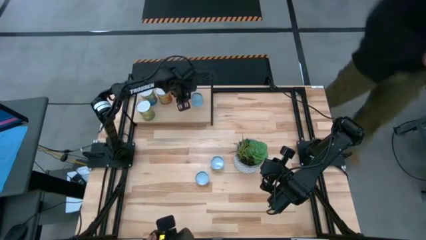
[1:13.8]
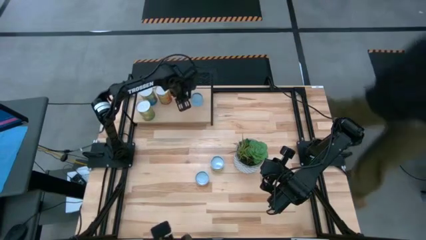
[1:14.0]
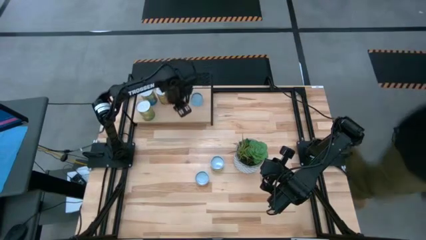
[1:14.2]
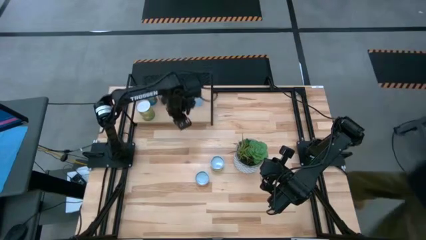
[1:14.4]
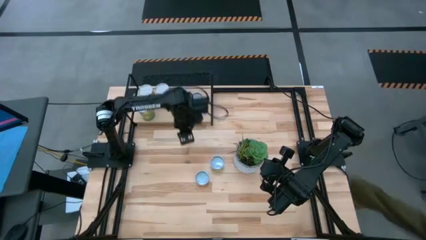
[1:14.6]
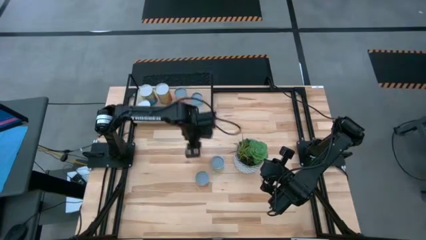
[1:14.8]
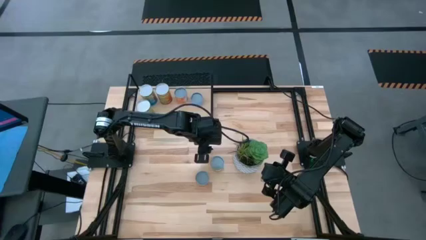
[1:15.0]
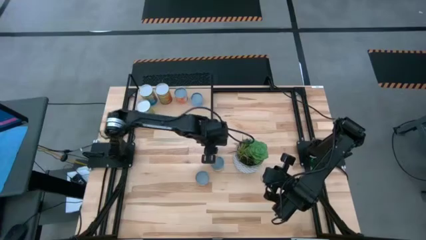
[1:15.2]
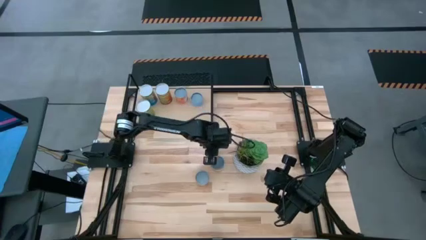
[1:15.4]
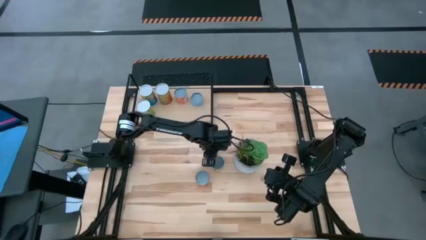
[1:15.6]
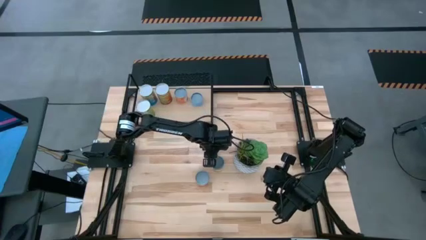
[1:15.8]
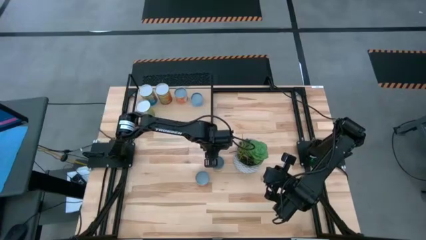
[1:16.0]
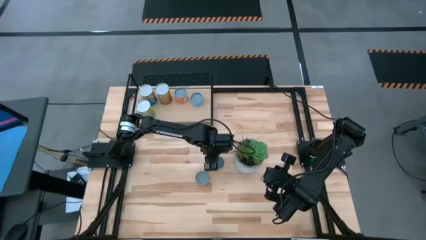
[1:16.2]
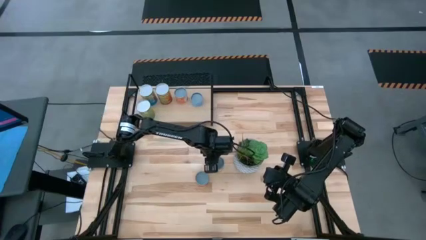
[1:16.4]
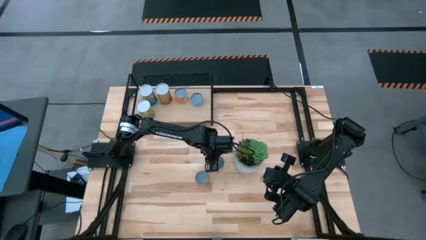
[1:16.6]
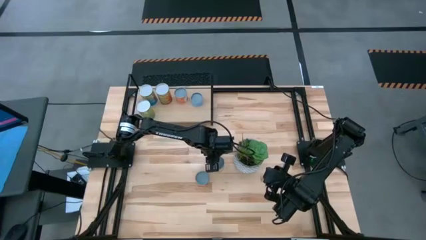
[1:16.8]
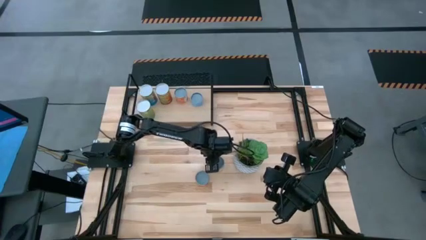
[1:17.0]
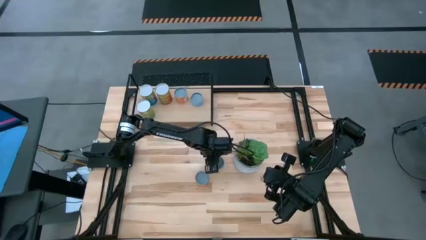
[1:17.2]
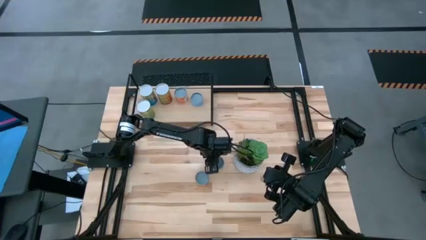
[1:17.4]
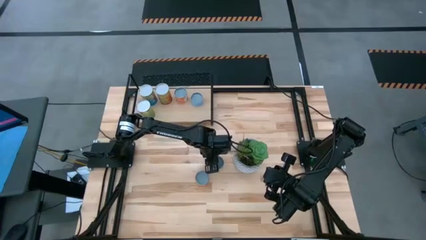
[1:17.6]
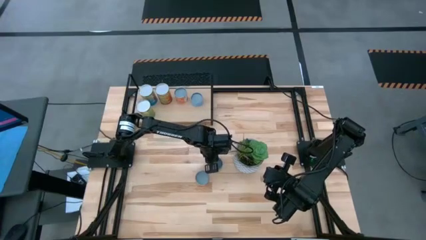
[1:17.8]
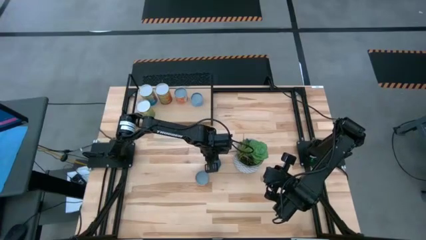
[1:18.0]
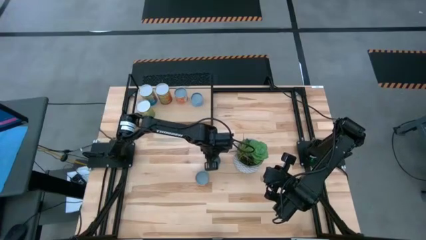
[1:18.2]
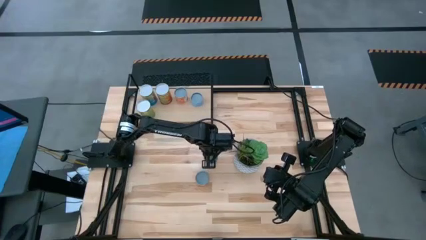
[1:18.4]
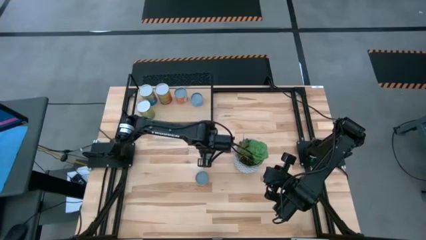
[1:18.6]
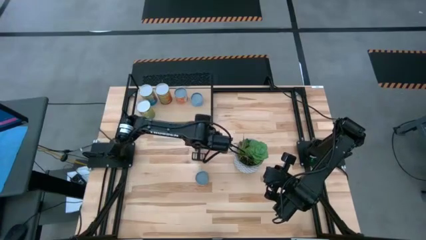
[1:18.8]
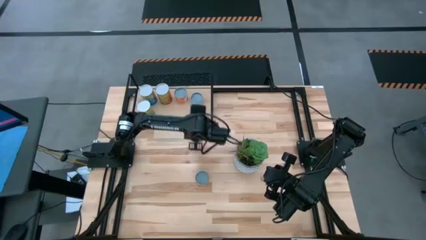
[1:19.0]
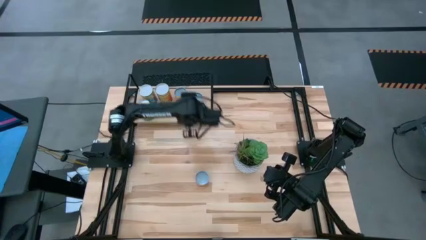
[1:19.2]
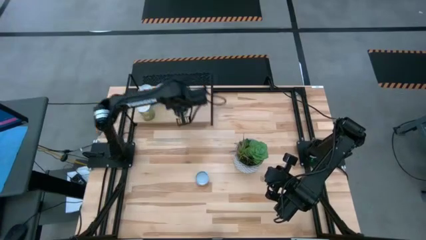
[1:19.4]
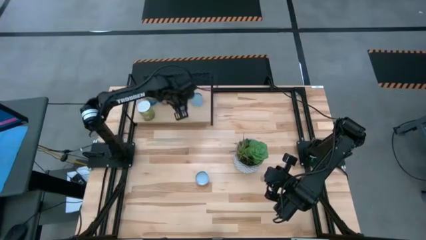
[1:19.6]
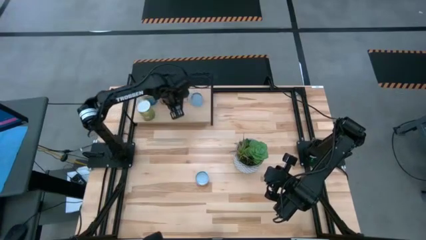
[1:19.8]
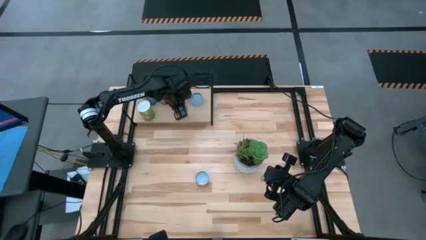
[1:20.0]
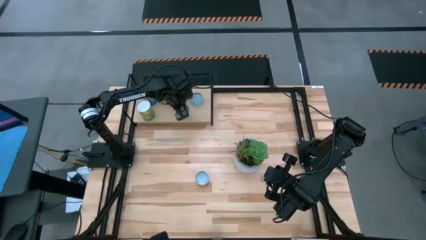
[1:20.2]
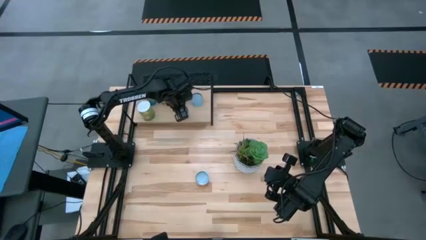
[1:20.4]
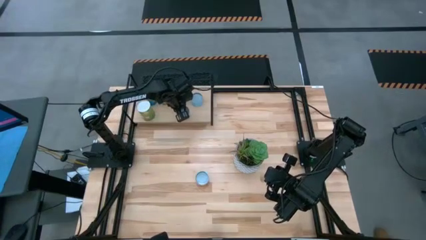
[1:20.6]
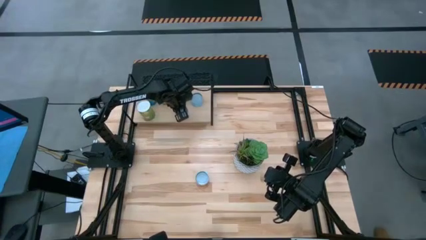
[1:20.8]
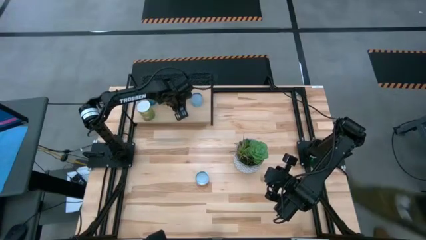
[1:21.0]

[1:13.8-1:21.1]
Task: Pick and place cans onto a shelf
Put the canned peaches on the shelf

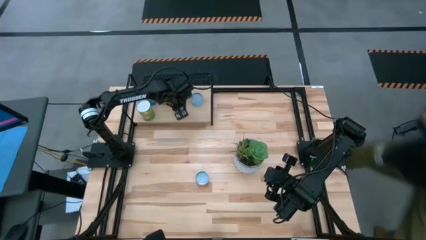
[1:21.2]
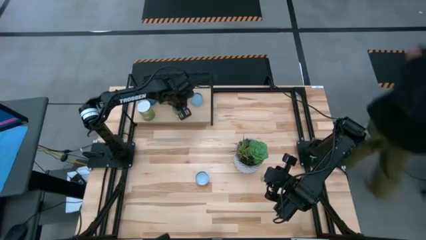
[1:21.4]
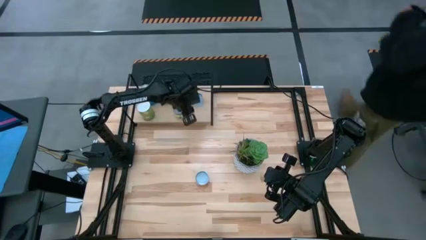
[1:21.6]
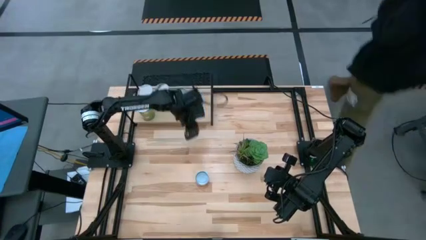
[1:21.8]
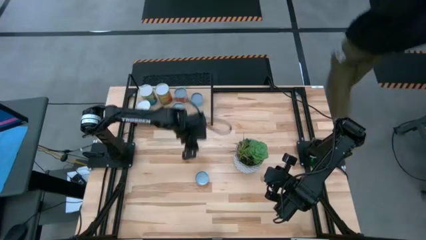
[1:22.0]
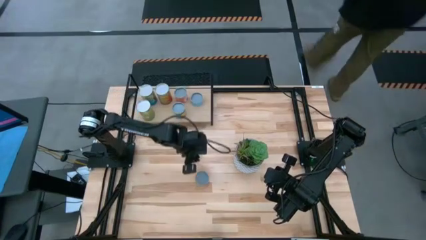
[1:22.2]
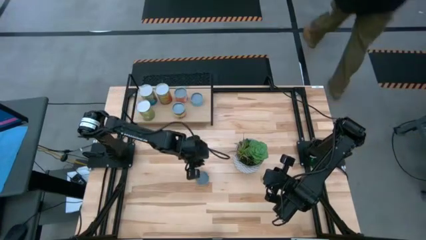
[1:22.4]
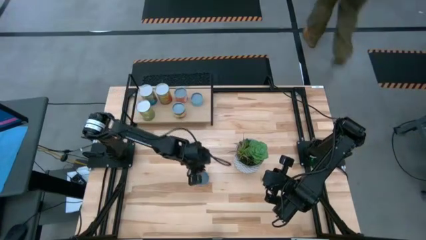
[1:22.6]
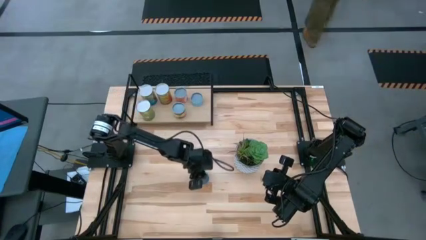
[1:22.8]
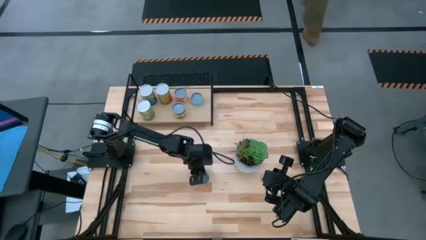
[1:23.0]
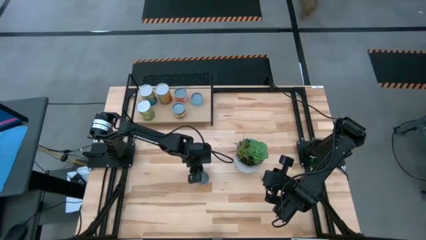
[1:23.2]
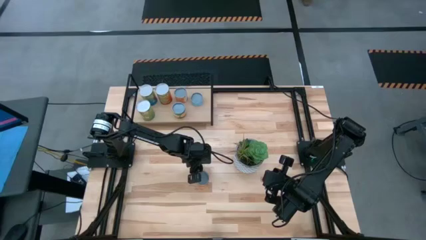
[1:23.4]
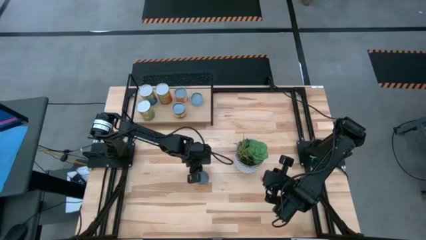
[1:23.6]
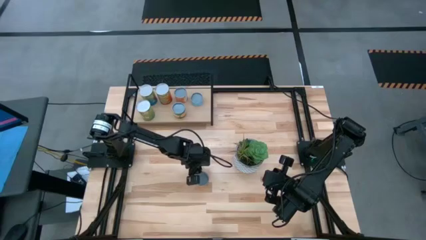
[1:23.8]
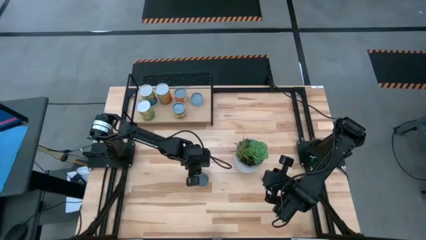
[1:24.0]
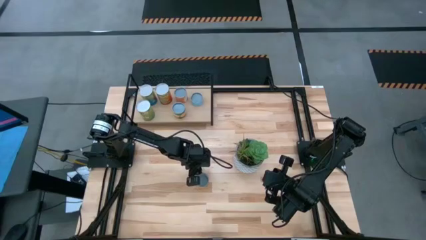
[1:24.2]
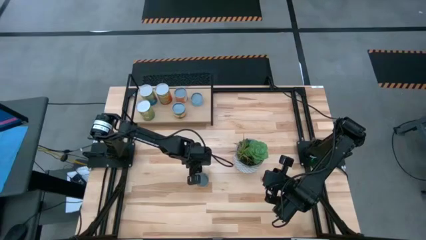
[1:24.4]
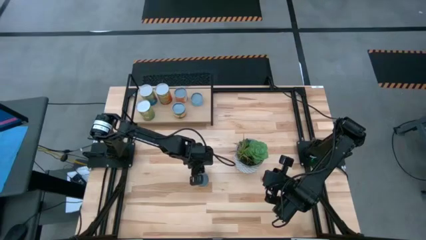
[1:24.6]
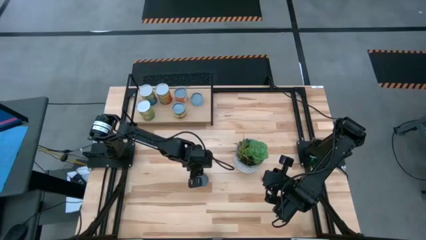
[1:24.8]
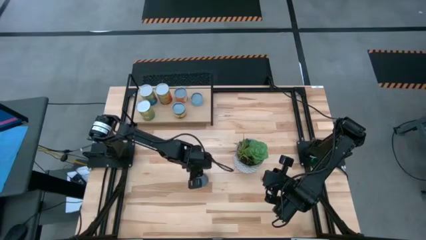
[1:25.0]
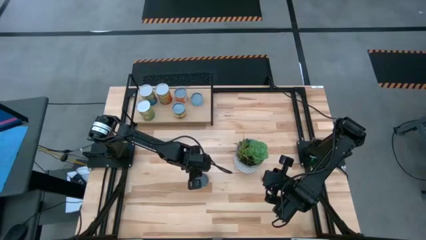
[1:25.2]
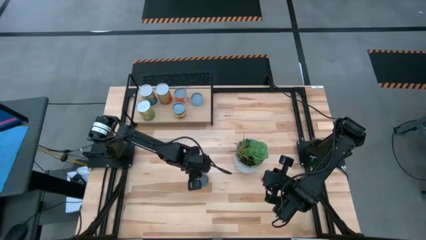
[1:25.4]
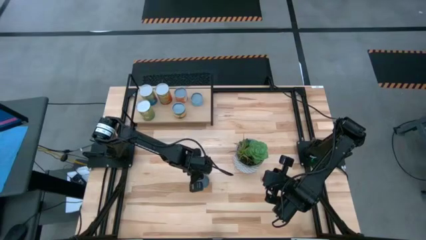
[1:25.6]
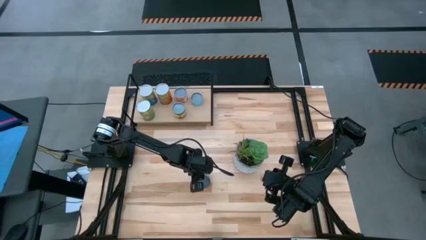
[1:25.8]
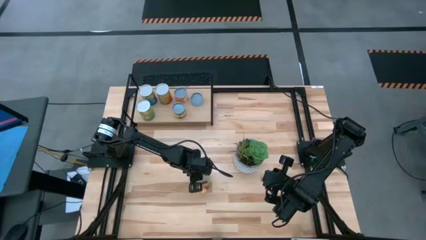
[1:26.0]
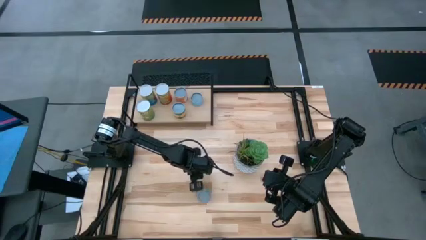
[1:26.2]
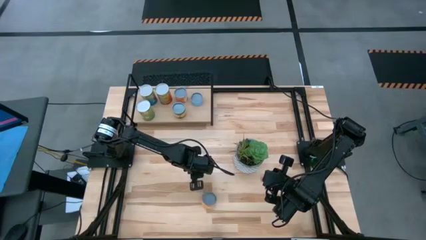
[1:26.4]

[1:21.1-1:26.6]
Put the canned pineapples on the shelf

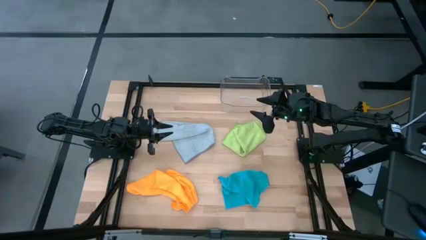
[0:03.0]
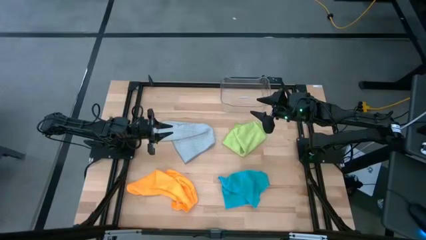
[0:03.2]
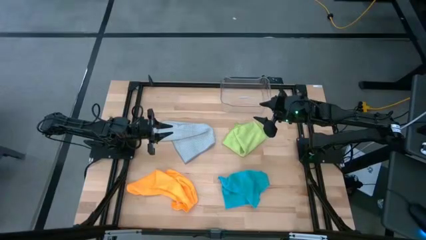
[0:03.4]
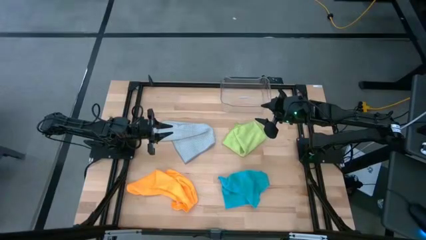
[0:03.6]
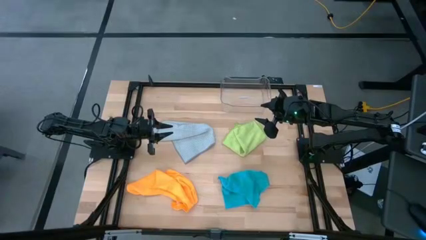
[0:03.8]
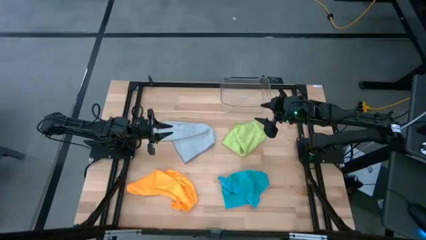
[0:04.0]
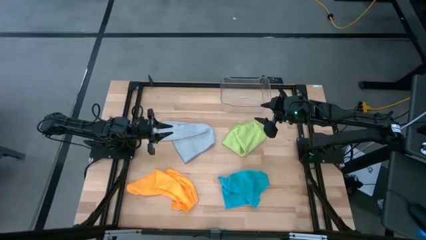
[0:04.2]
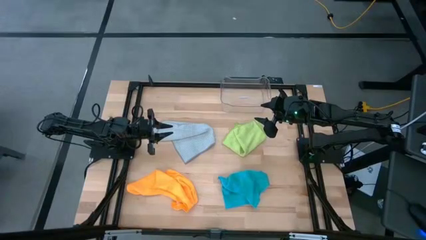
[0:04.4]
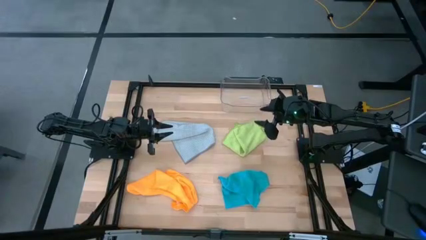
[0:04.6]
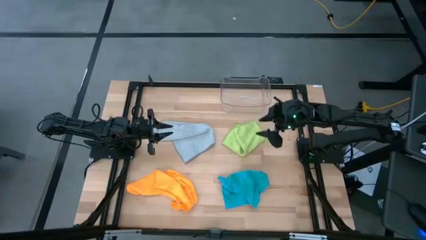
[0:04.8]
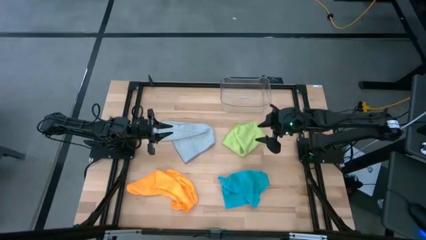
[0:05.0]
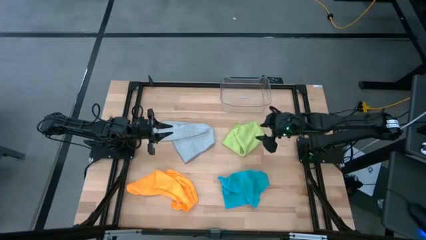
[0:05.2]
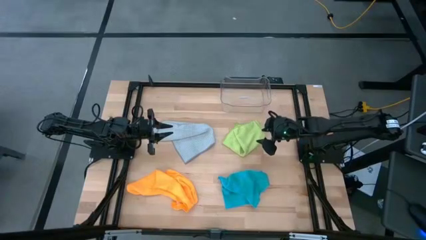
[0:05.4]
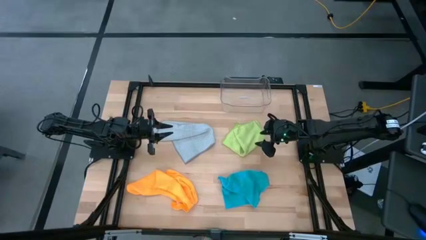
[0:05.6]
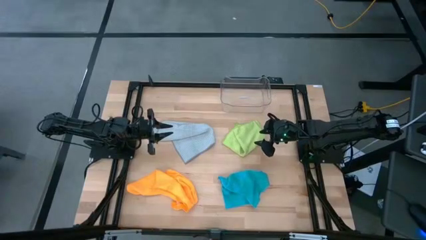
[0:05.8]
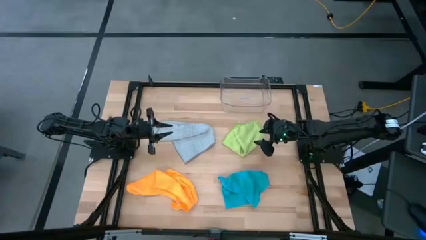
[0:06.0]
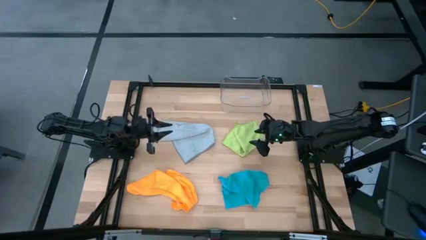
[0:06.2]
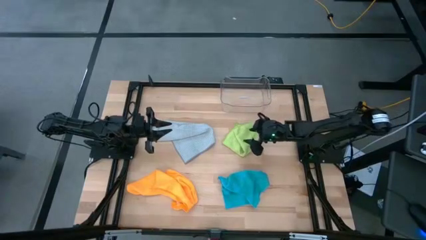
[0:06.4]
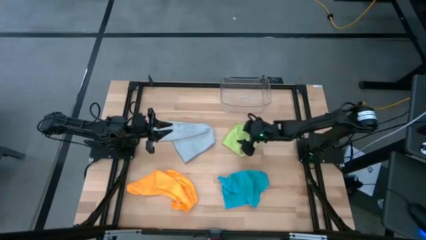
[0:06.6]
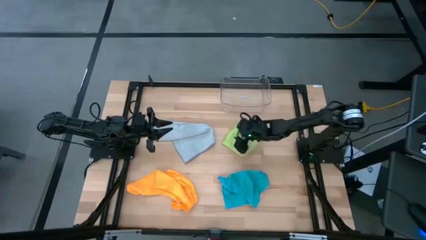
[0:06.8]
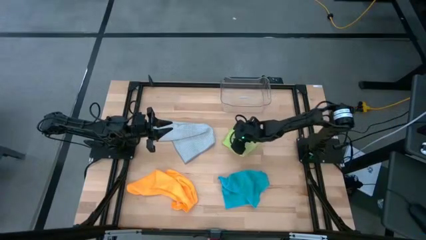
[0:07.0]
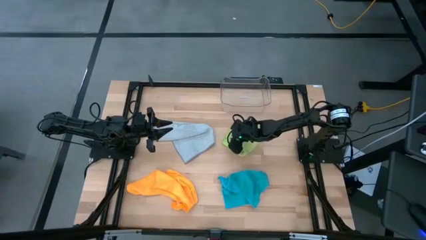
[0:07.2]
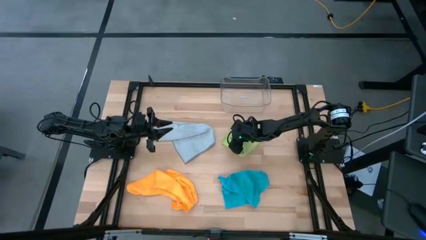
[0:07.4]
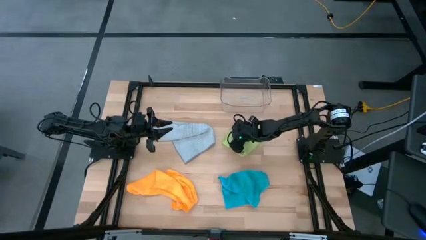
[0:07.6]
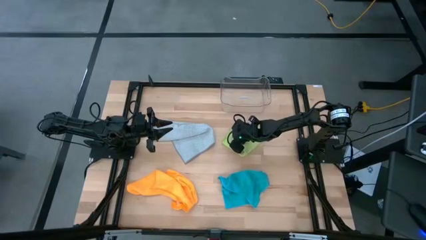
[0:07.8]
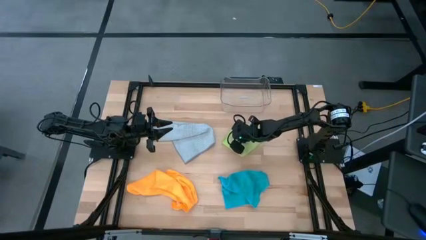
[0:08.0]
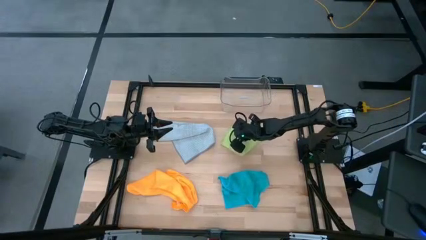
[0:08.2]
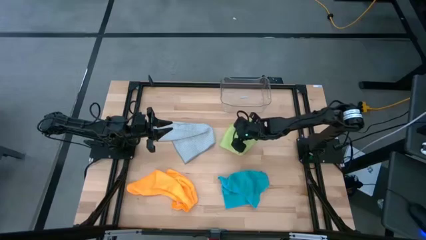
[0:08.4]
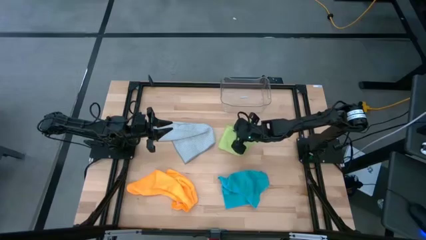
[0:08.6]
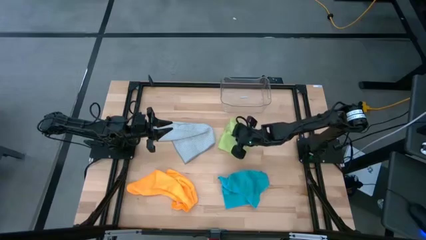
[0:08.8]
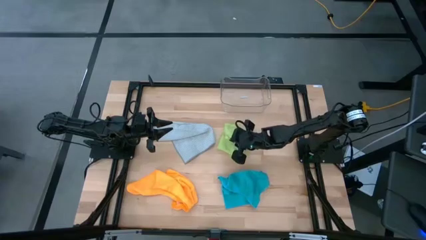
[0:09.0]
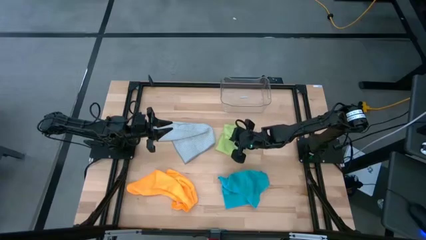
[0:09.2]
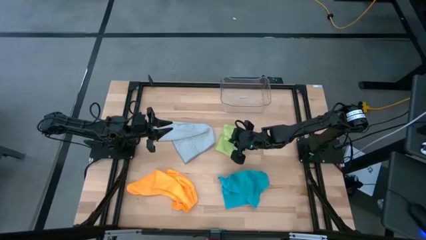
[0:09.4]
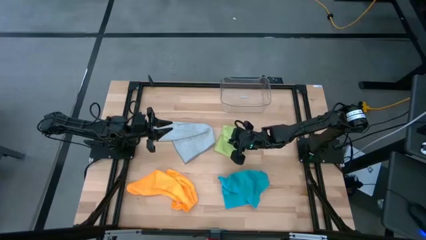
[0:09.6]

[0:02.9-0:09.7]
Task: Fold microfiber towels
Fold the green microfiber towel
